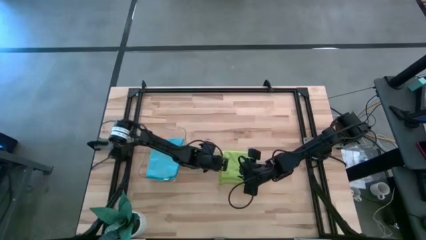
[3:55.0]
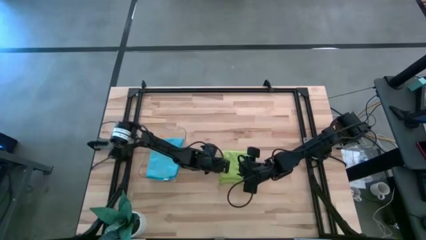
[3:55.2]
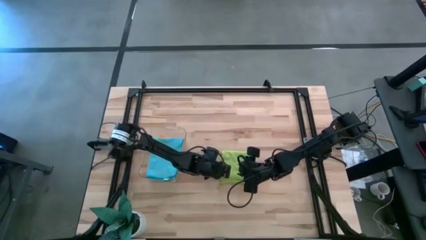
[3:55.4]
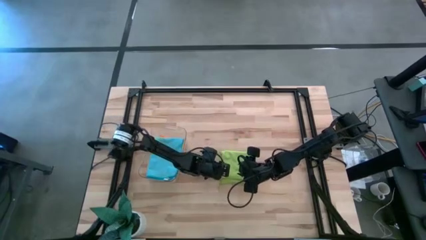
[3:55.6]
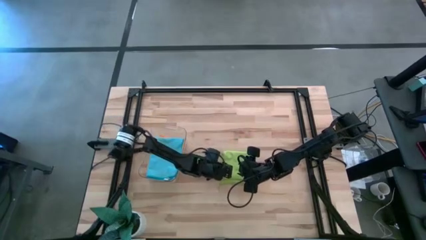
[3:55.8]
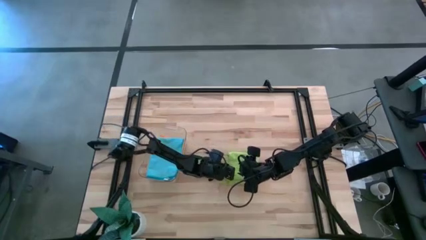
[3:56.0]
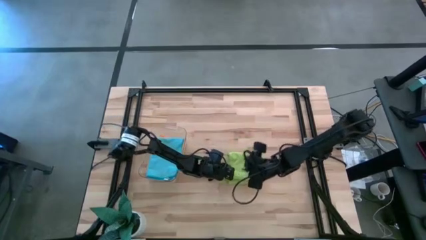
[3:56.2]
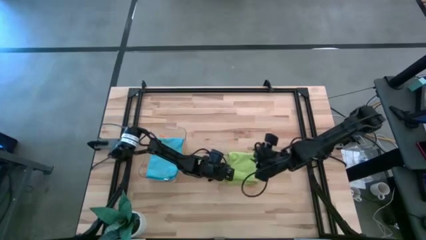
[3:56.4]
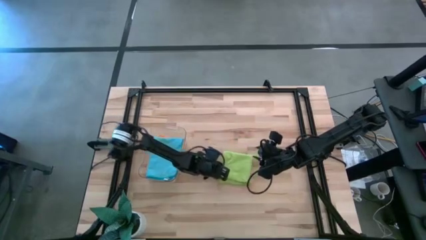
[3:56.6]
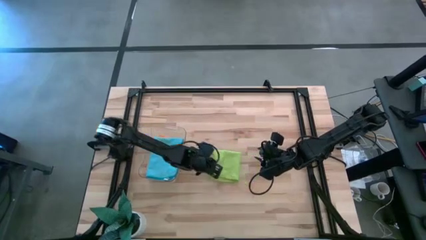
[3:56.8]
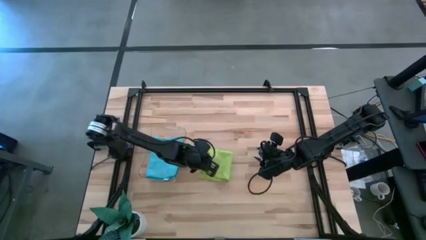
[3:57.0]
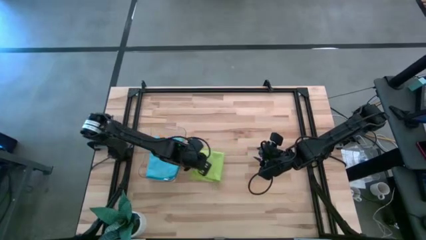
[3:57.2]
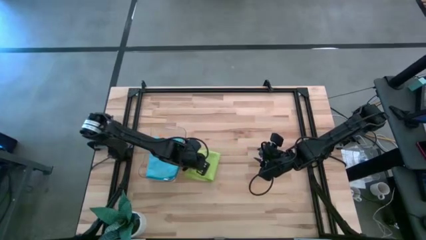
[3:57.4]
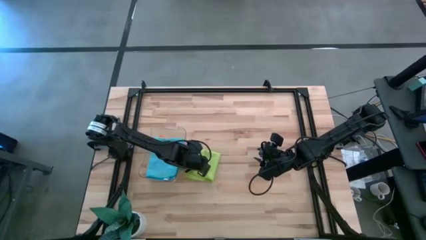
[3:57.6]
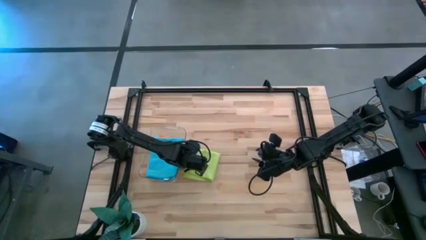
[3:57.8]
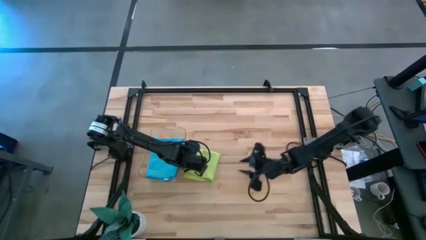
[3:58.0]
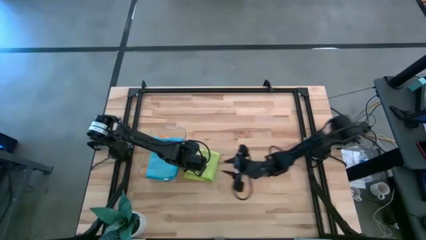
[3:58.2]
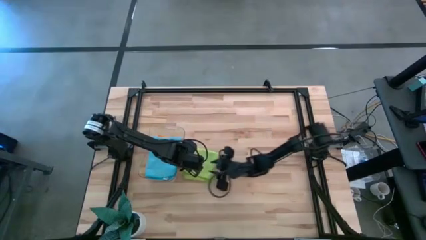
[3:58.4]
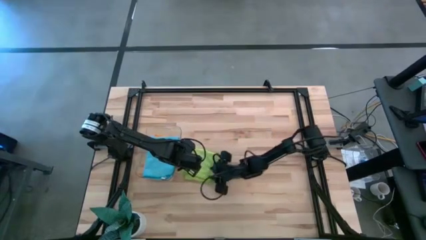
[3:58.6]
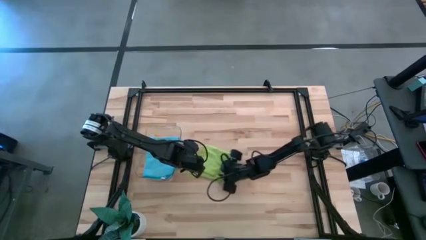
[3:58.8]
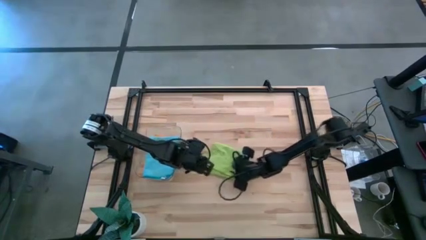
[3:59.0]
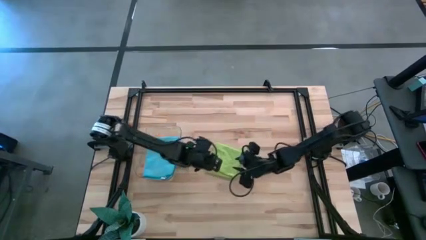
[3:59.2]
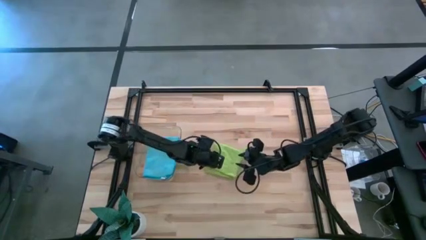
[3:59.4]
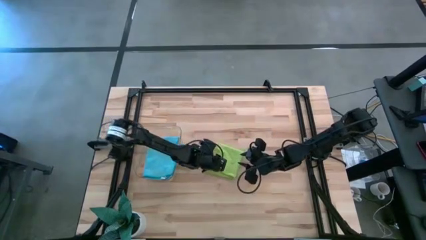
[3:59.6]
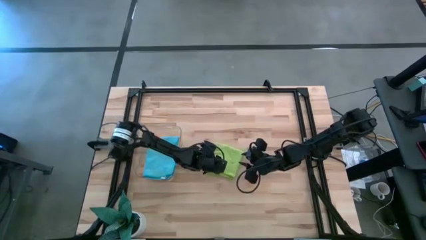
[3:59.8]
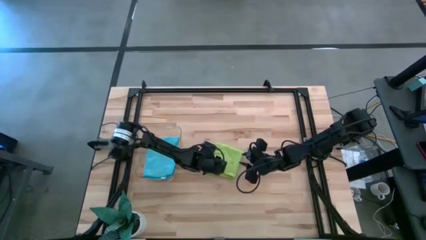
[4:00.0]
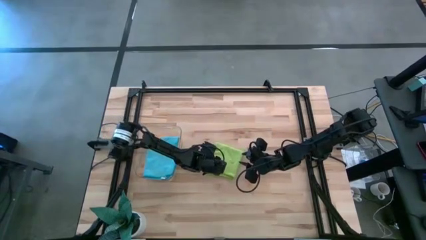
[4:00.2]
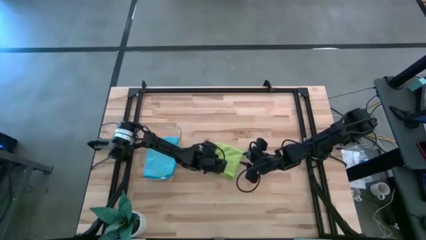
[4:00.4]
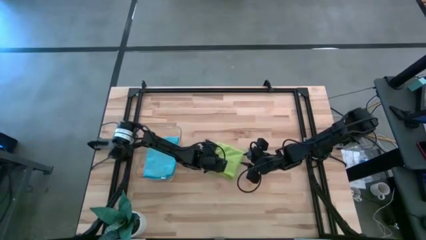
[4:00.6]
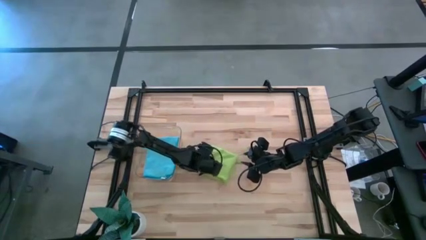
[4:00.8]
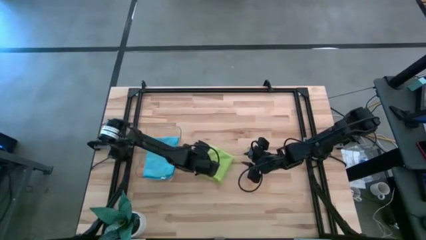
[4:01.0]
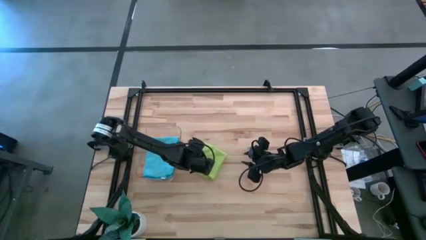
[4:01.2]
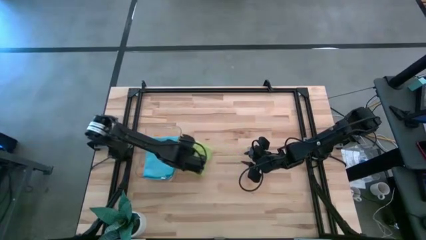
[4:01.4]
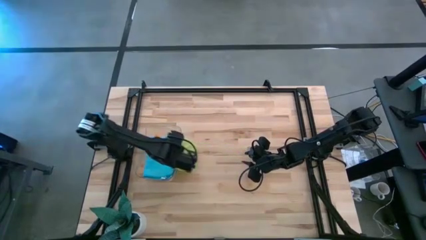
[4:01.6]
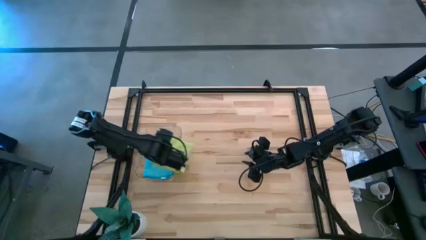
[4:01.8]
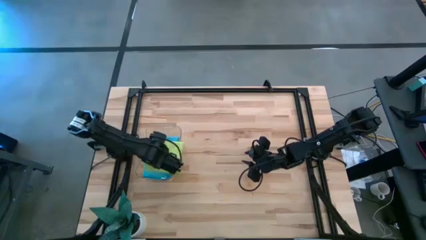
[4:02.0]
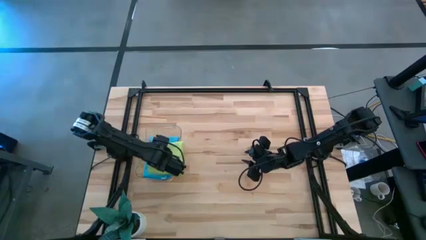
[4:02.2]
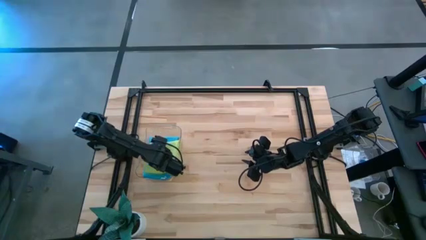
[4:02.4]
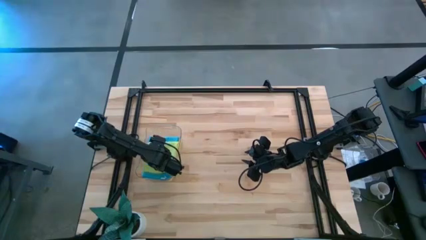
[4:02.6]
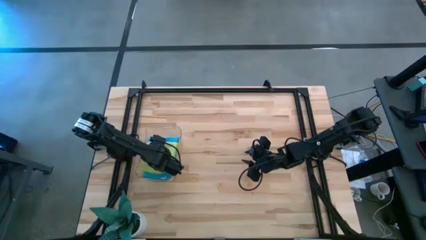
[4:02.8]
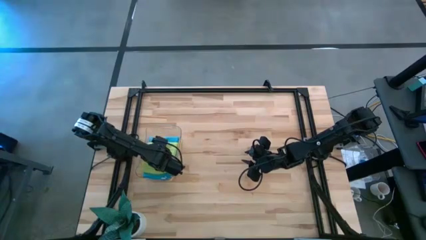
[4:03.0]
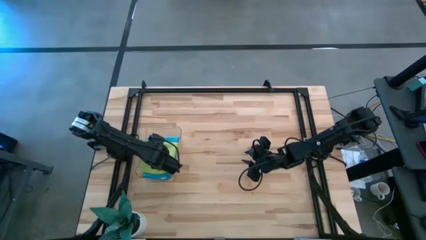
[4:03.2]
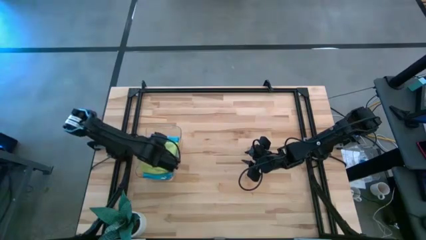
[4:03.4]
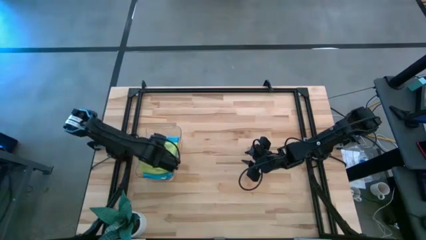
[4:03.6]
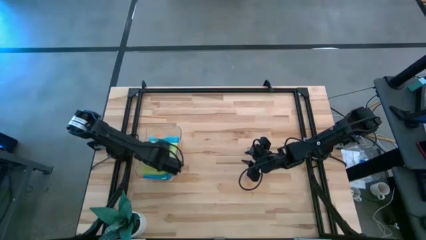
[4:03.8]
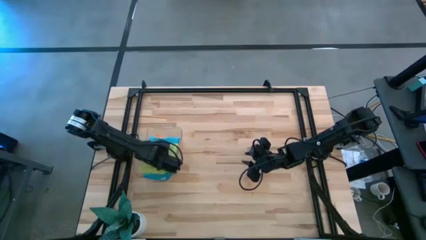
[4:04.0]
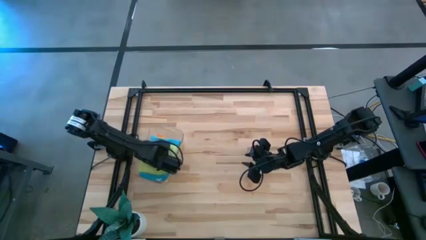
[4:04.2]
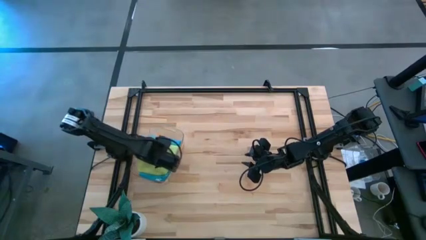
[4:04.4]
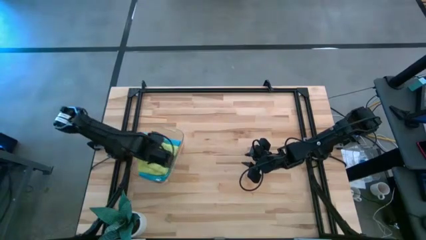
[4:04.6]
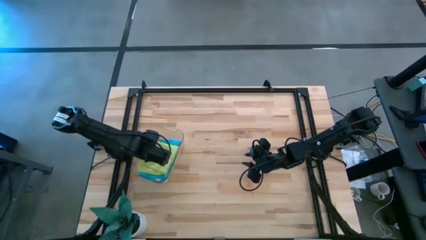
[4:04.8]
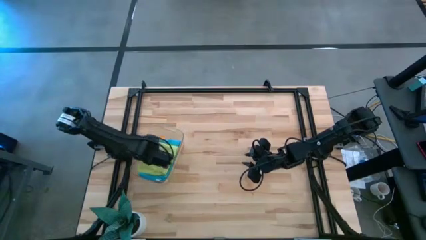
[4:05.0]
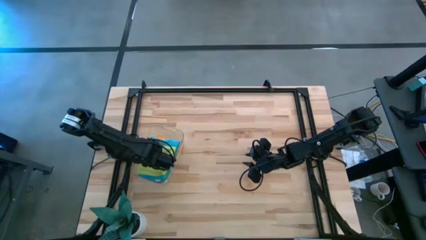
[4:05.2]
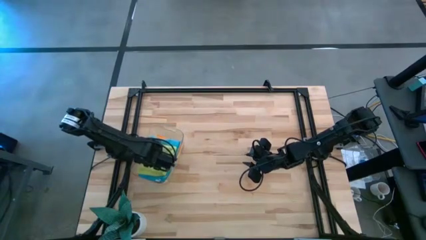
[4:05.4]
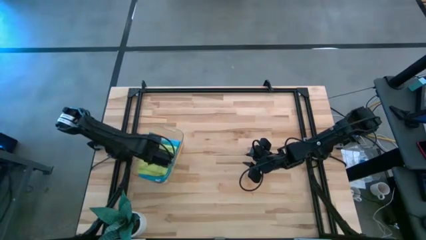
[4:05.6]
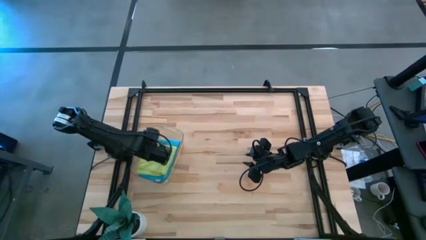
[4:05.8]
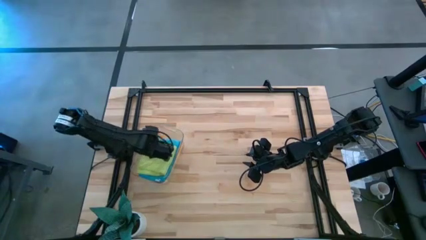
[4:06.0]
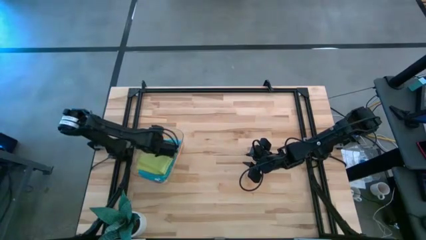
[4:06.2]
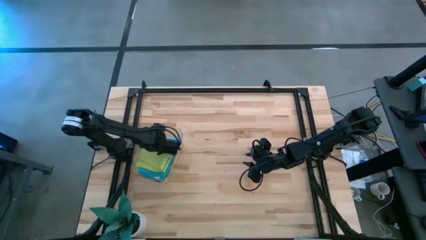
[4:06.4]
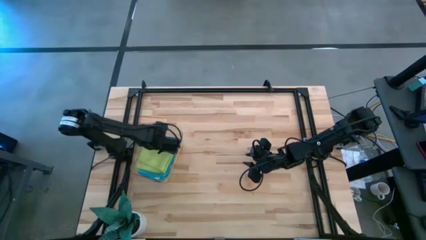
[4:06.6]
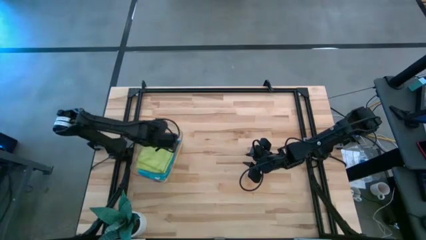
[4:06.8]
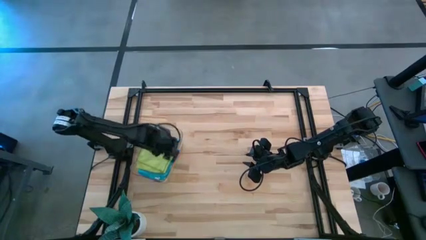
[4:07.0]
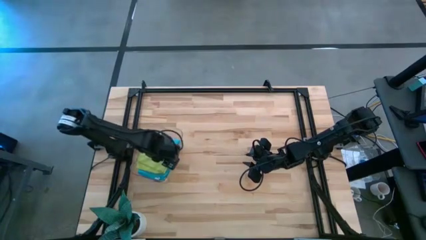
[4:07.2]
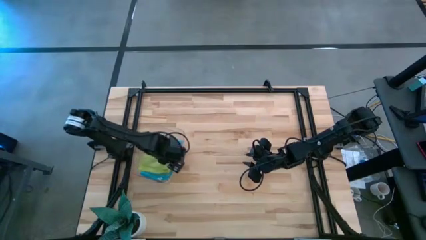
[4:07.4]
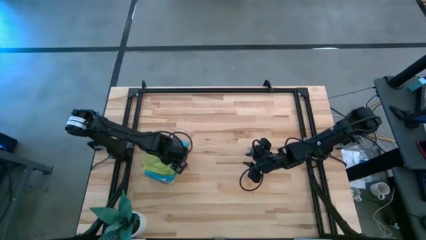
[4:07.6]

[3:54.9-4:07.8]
Task: Fold microfiber towels
Put the folded green microfiber towel into the transparent bin
